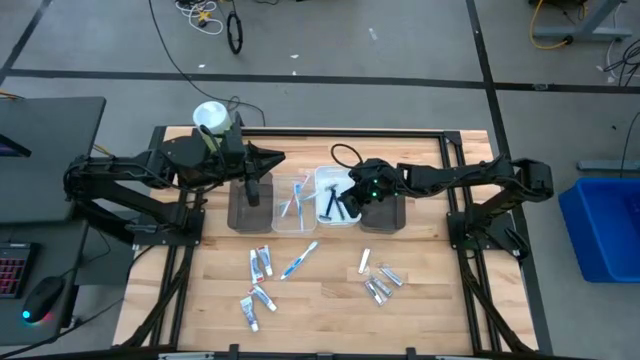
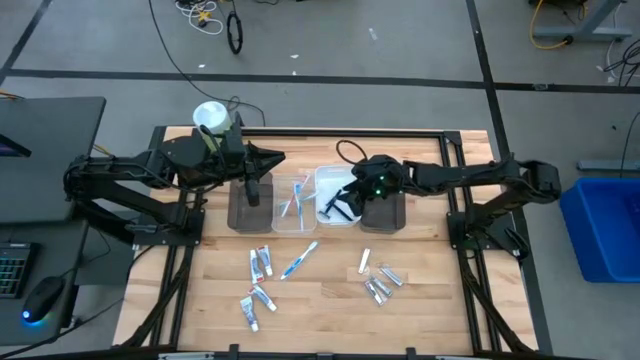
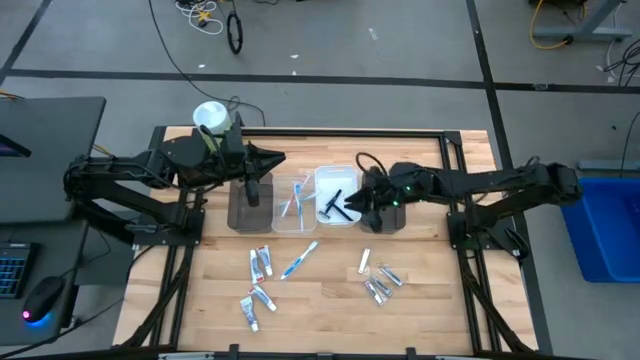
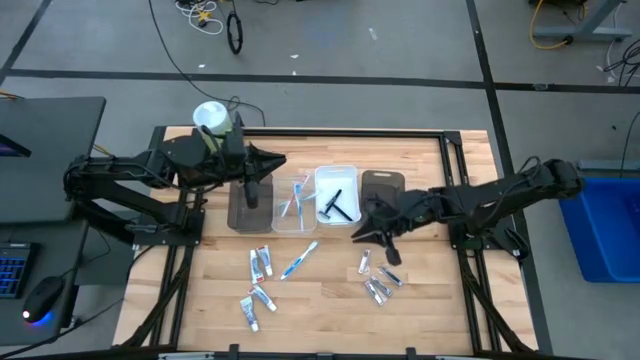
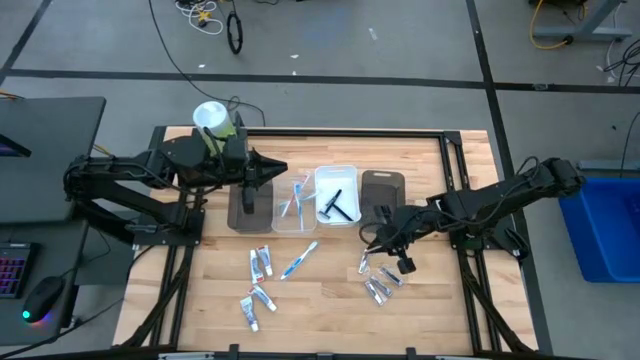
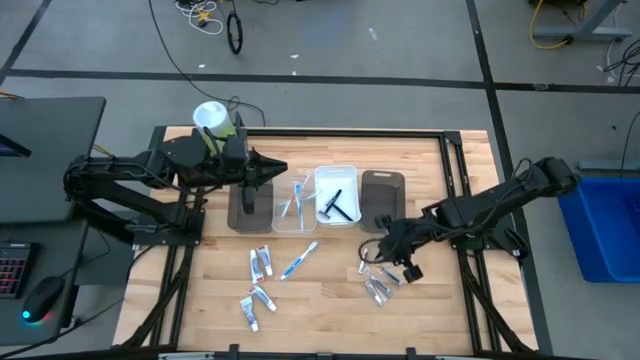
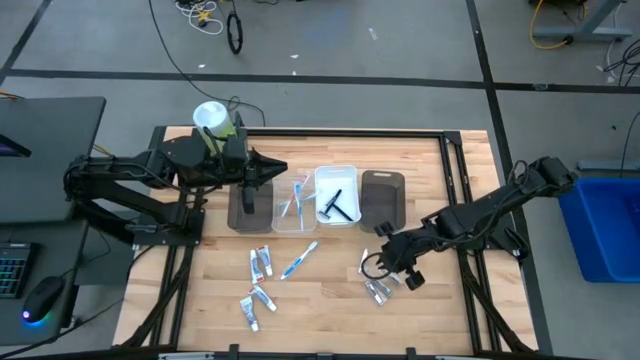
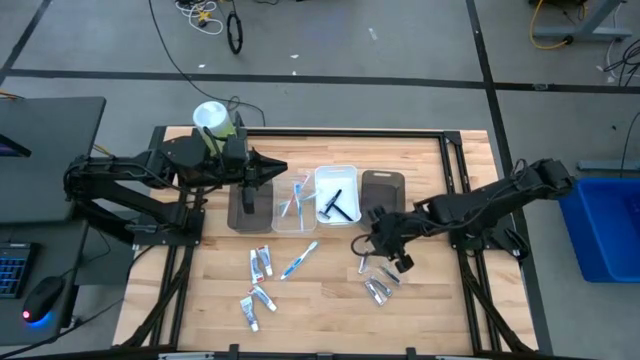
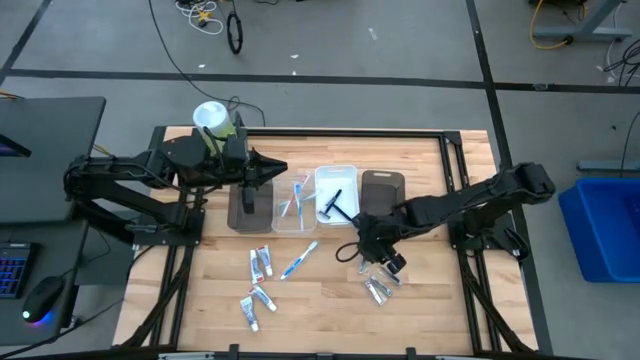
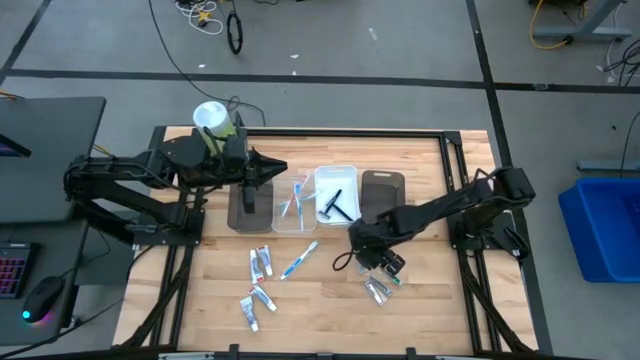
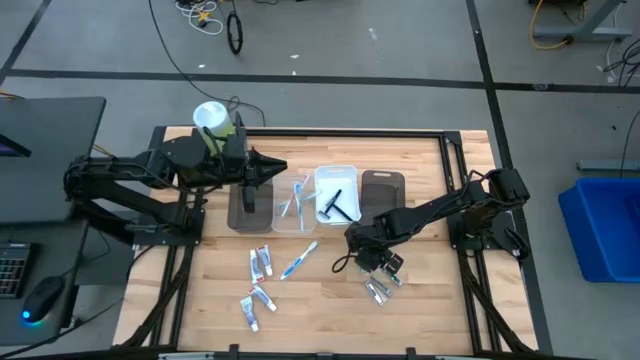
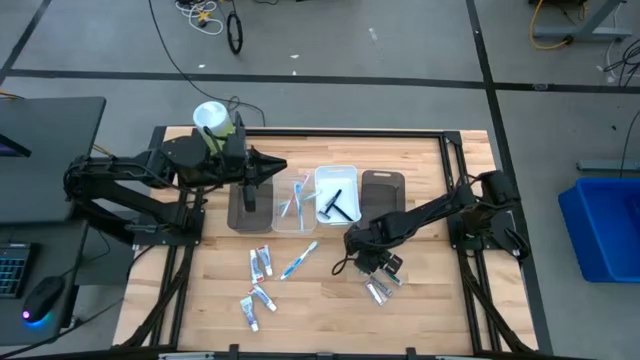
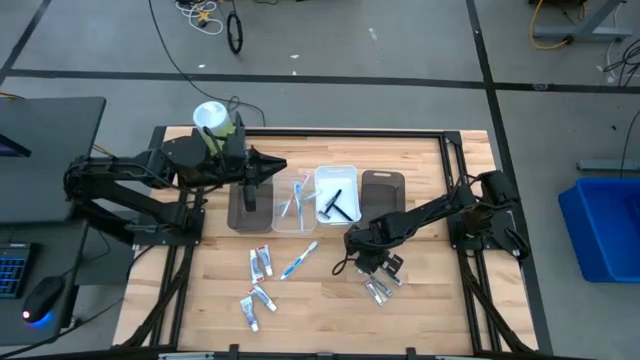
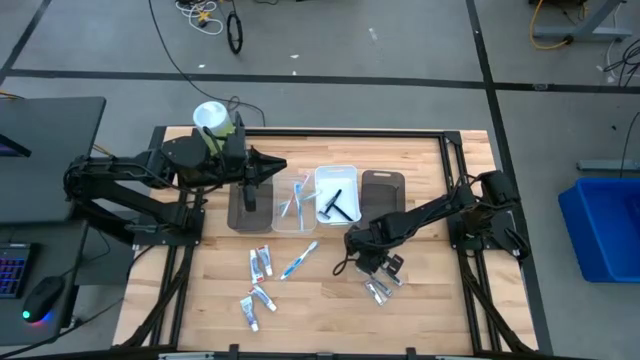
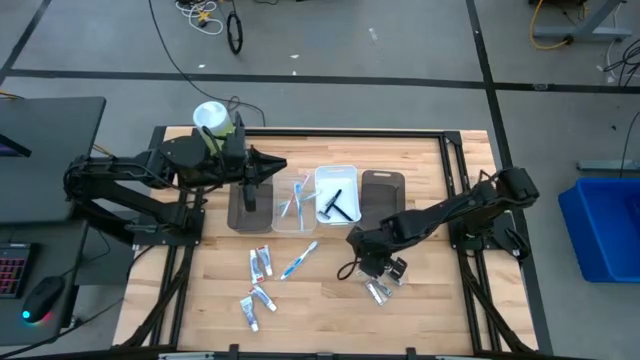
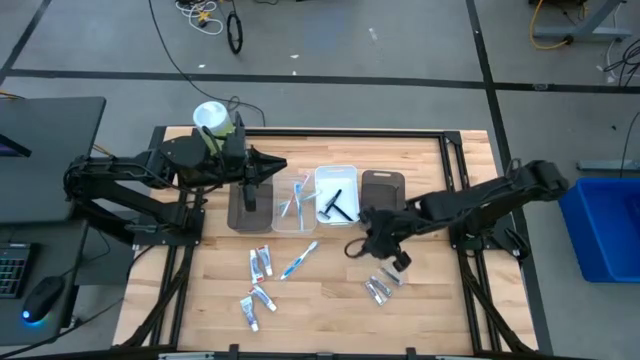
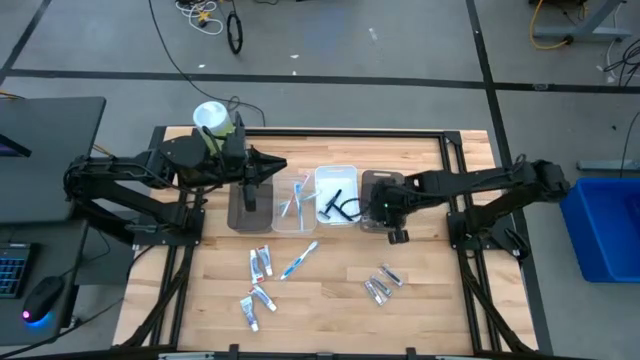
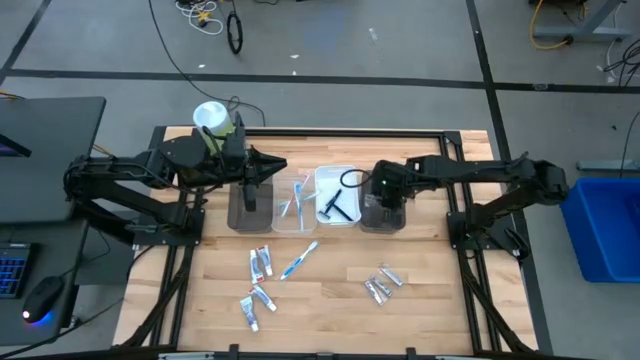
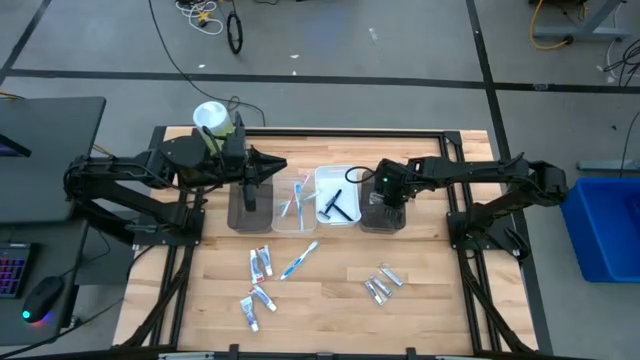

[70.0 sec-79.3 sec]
Task: Pick & Place Travel size toiletries
Put the silver nail cutter into the right black bin

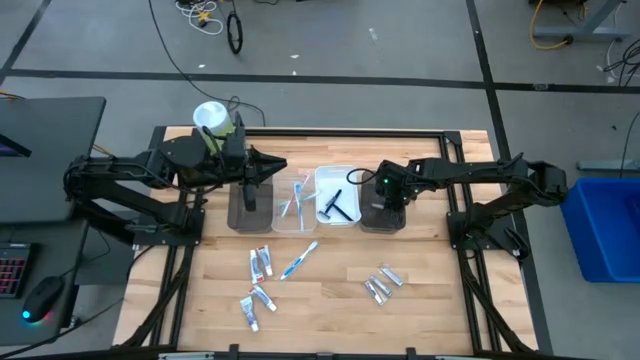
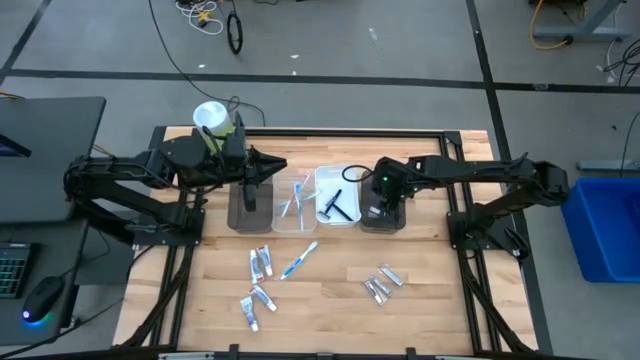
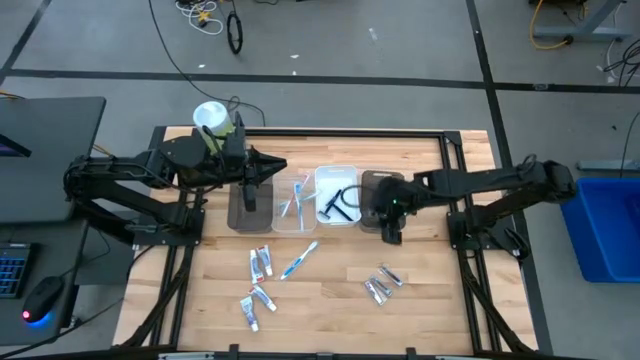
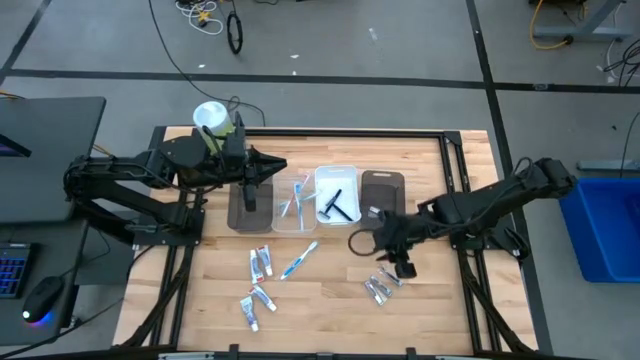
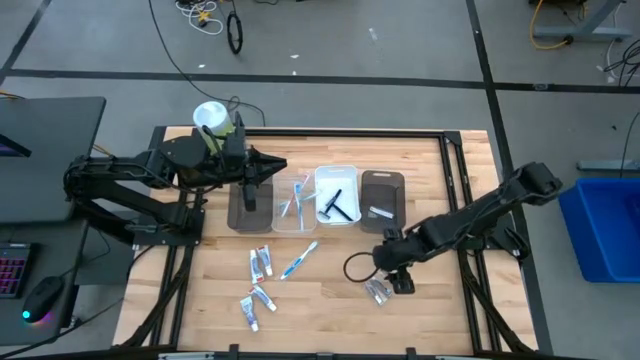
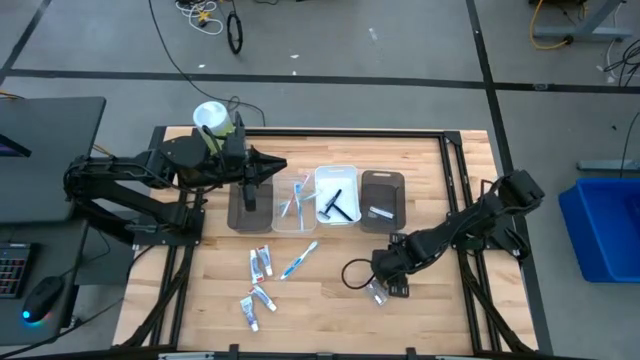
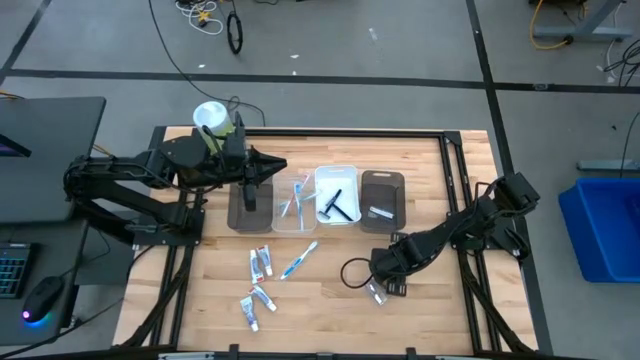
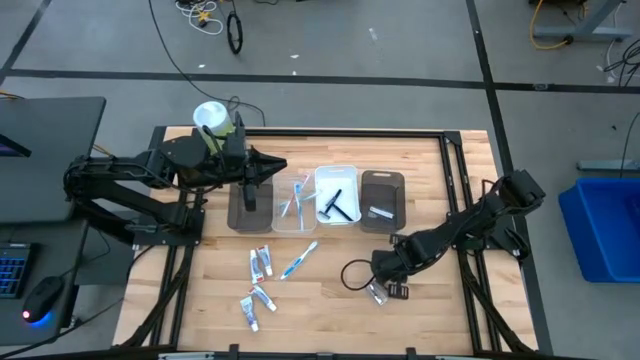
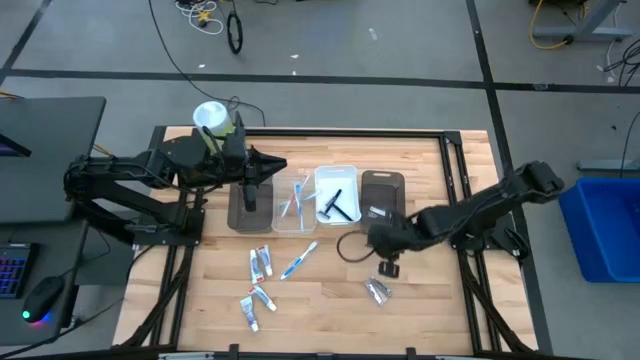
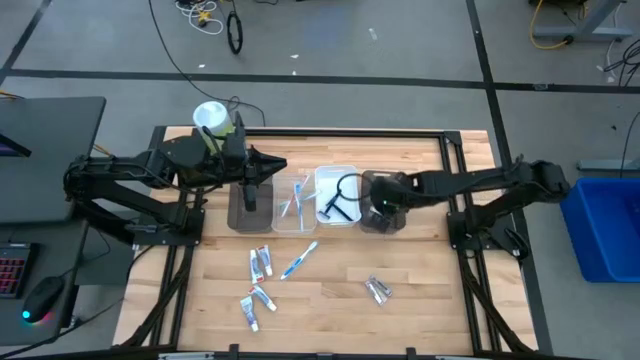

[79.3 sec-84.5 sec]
Put the silver nail cutter into the right black bin

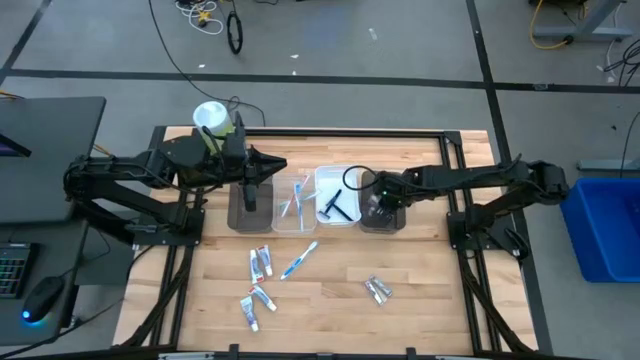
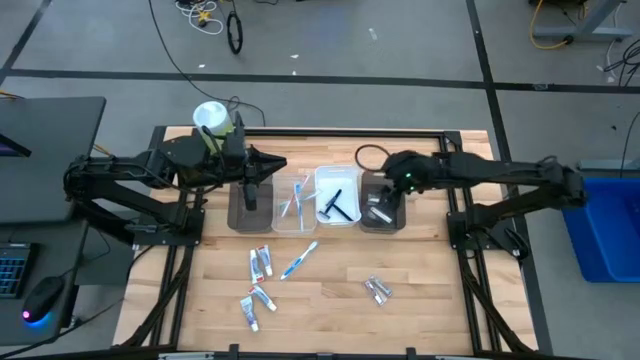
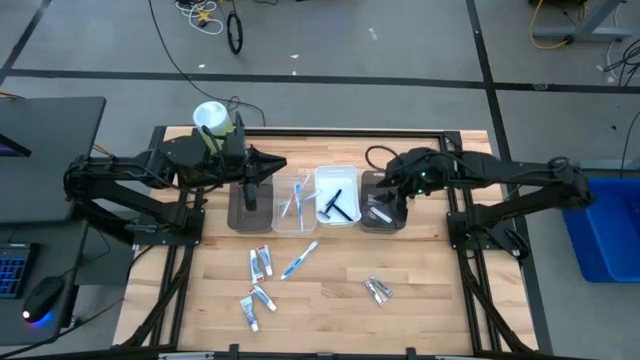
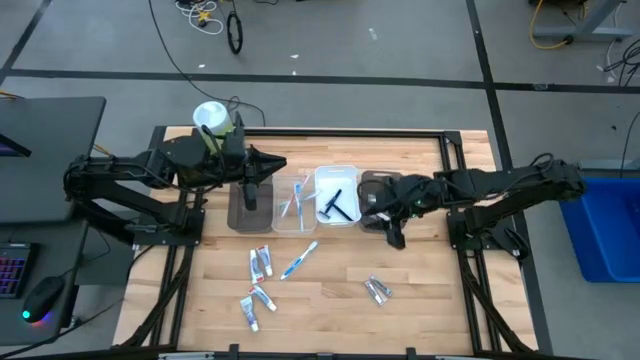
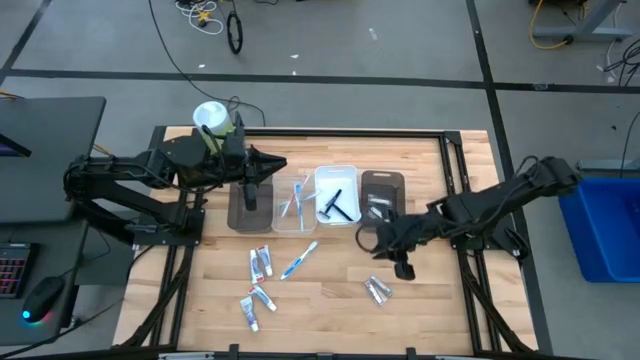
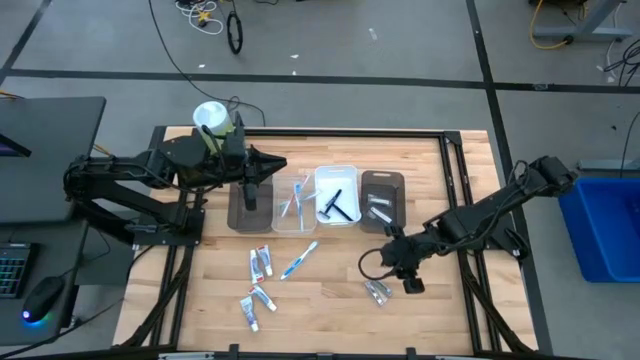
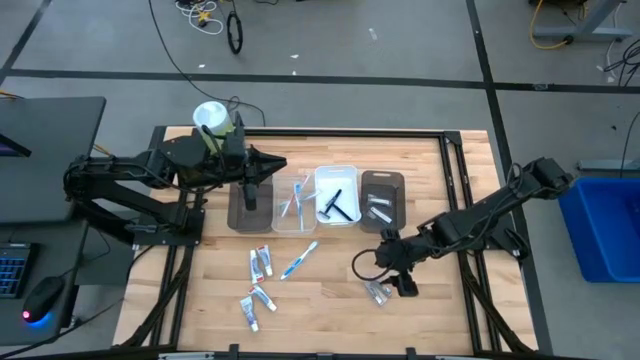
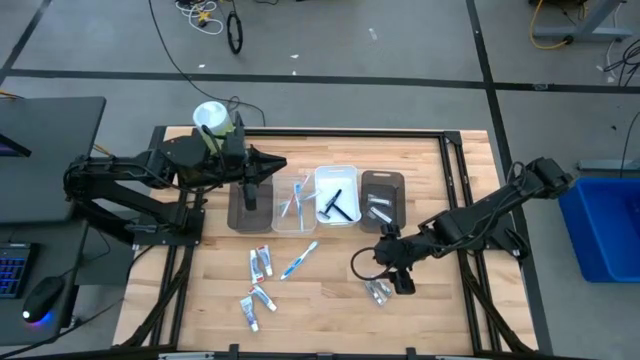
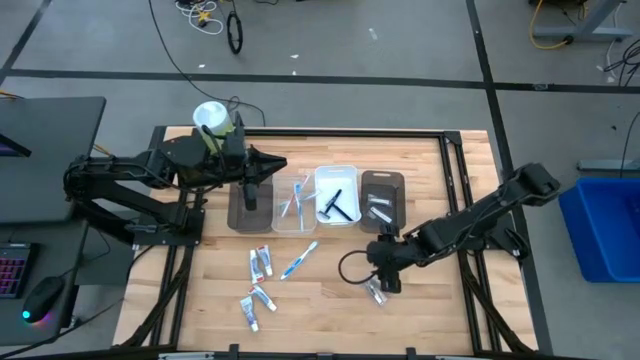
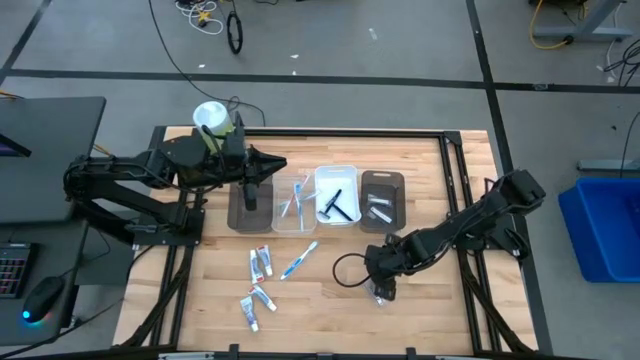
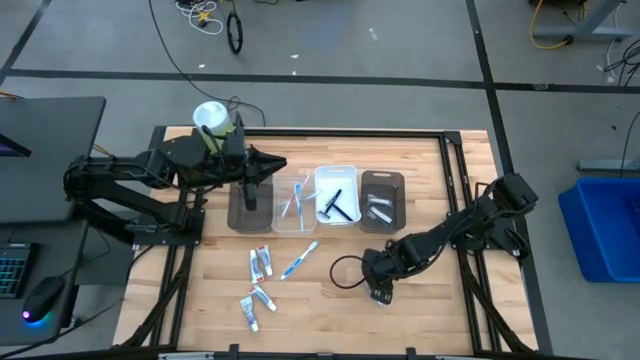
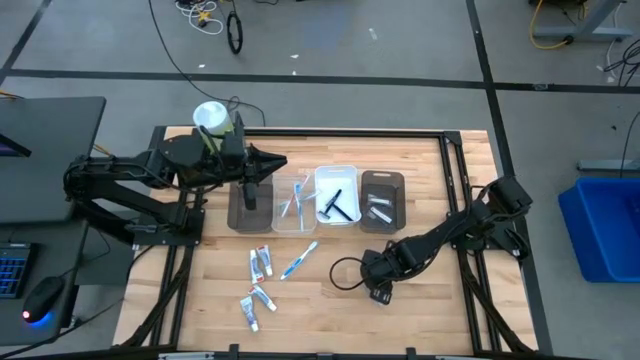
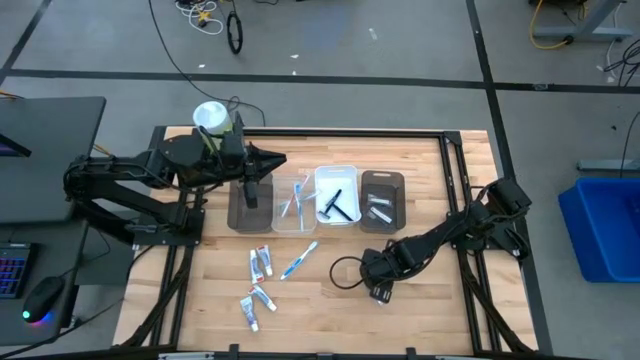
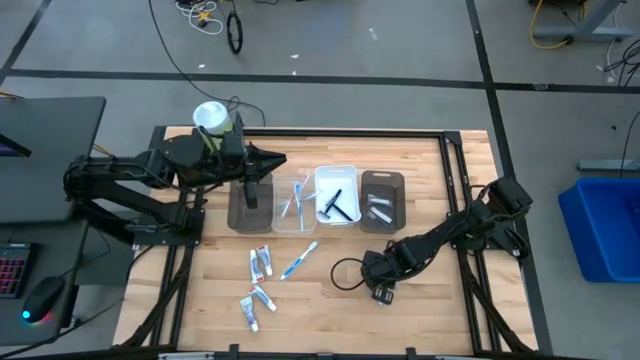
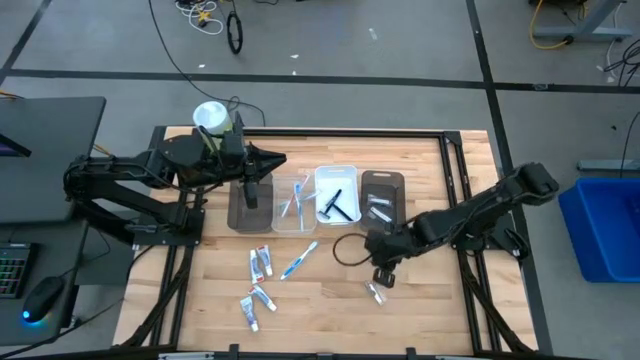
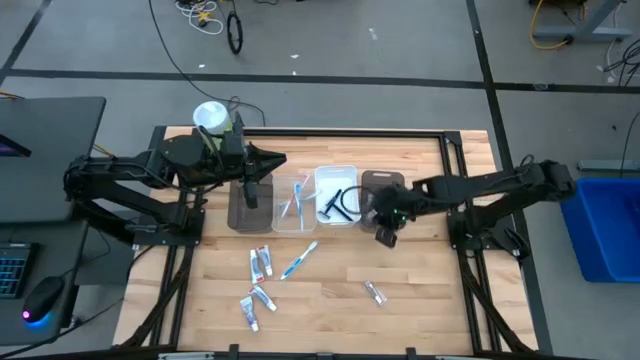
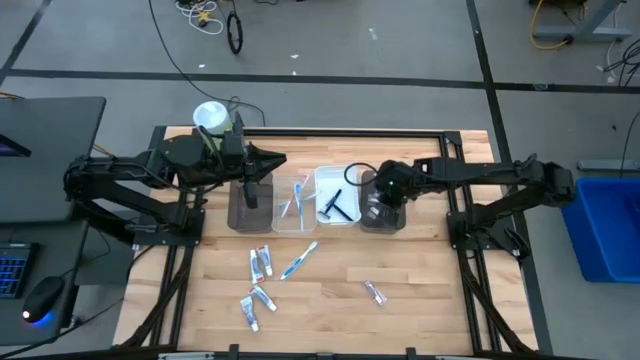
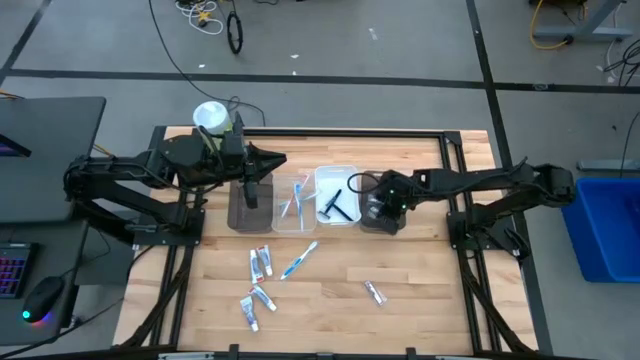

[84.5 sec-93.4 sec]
Put the silver nail cutter into the right black bin
